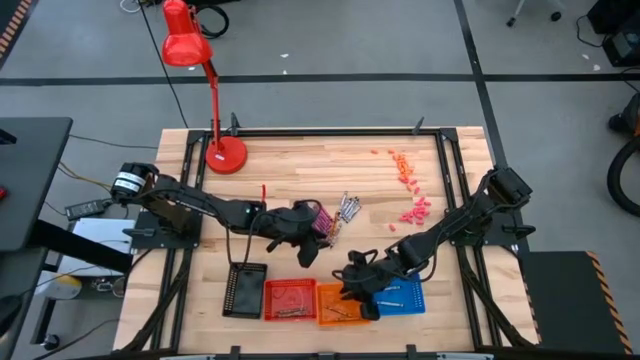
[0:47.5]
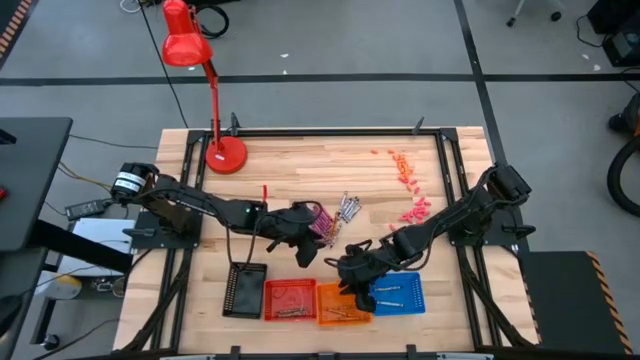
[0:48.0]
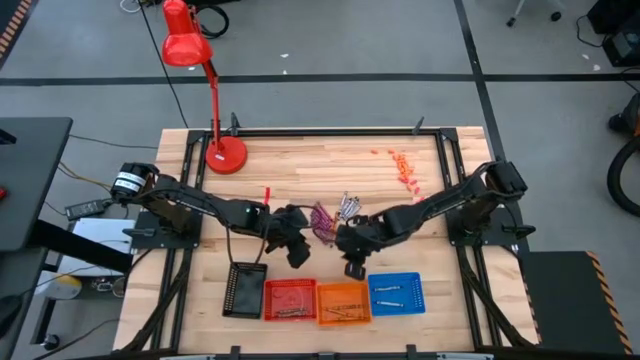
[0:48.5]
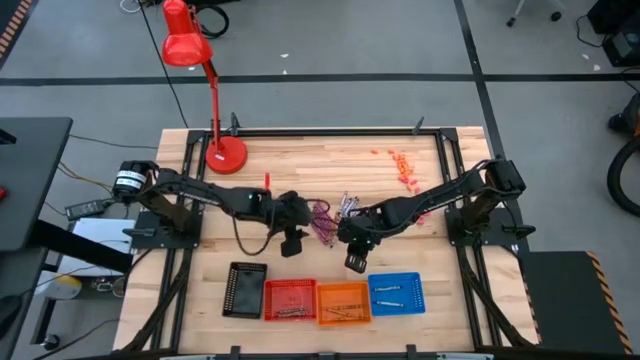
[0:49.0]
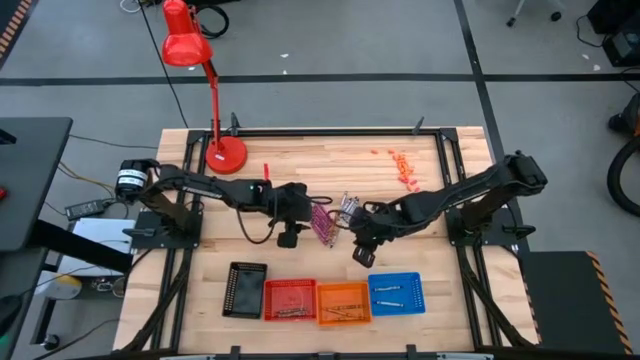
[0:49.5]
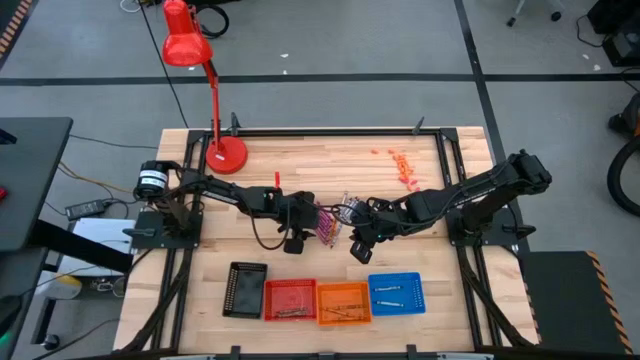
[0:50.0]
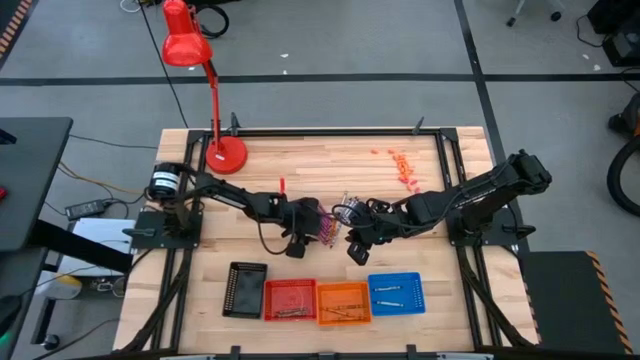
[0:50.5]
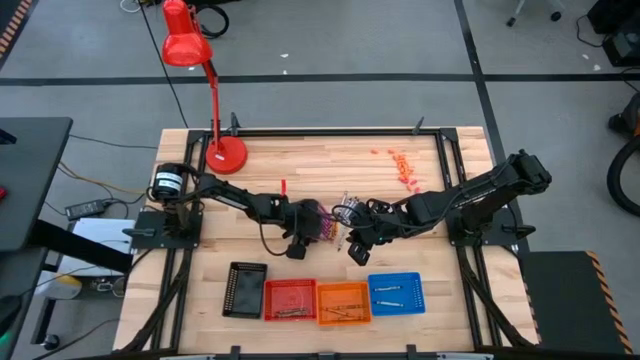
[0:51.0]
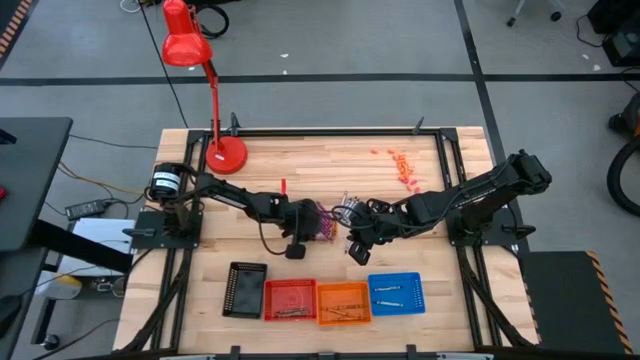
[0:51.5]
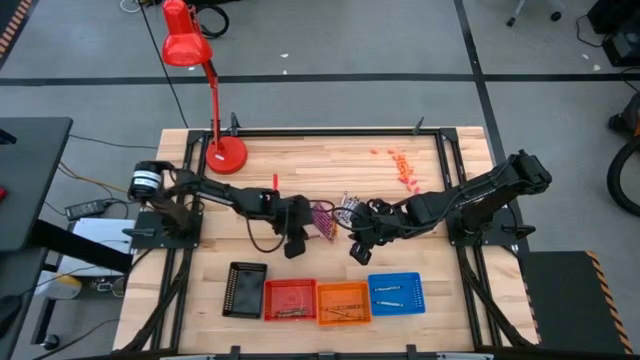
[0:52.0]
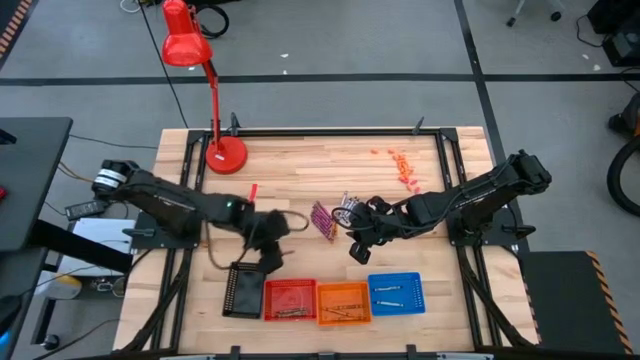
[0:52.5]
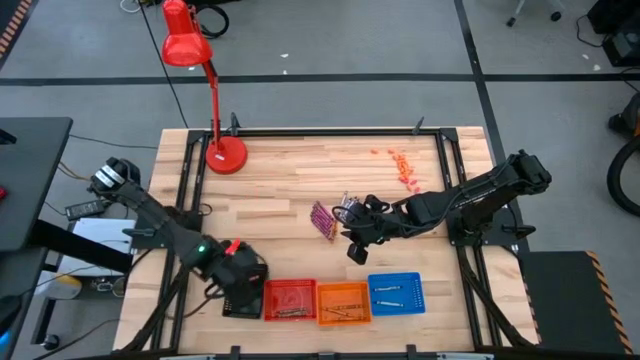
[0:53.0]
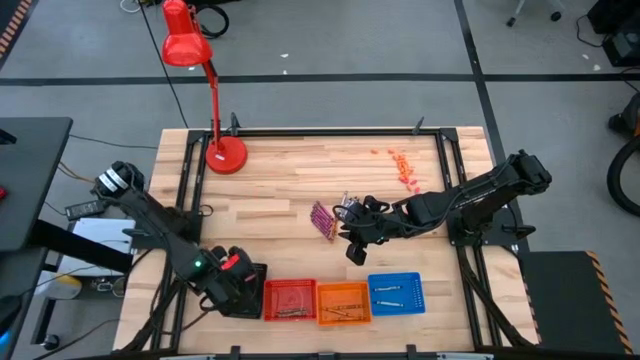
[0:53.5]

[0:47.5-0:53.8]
Task: Sort crayons
Put the violet crayon into the black bin

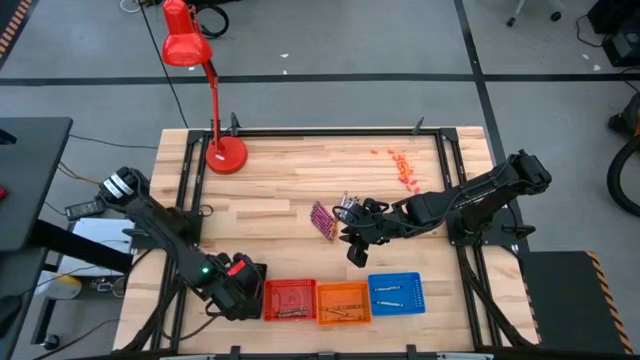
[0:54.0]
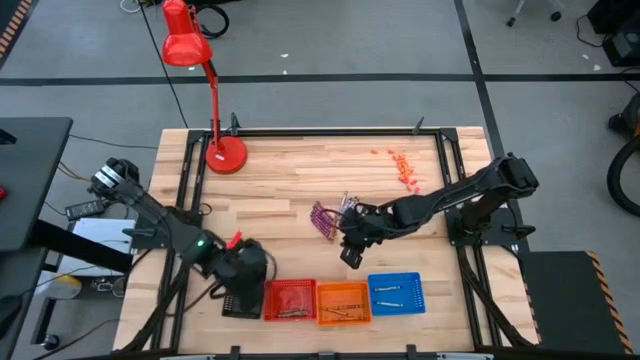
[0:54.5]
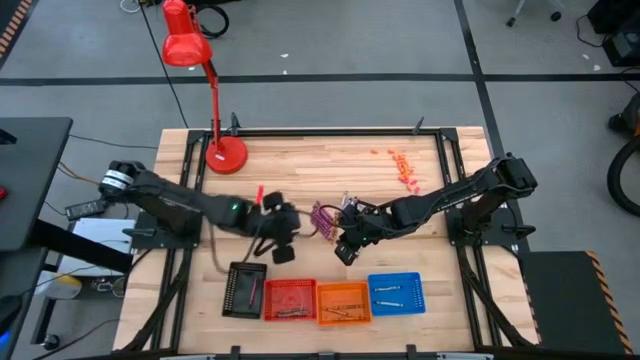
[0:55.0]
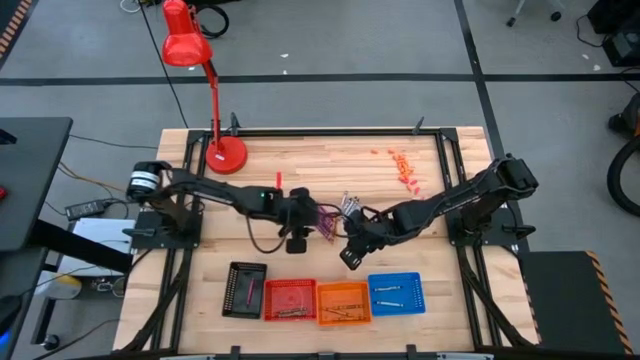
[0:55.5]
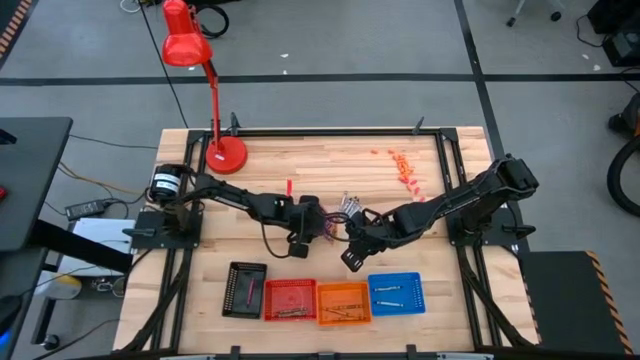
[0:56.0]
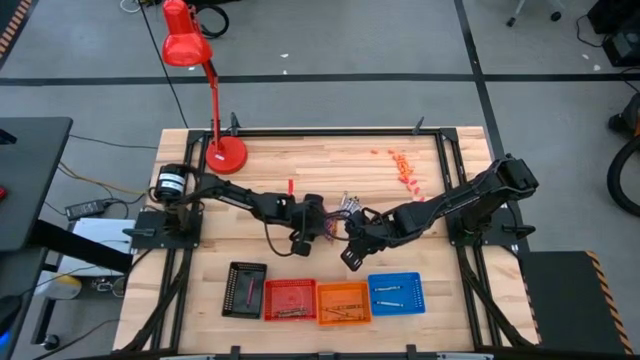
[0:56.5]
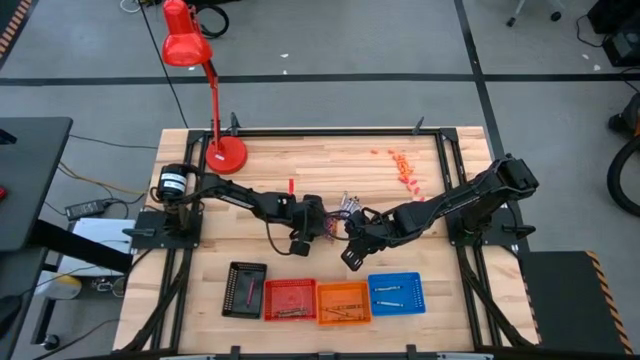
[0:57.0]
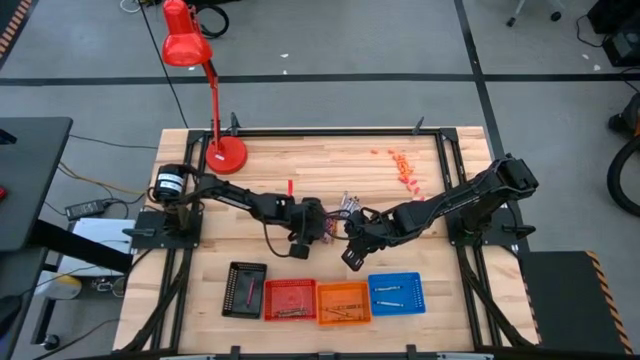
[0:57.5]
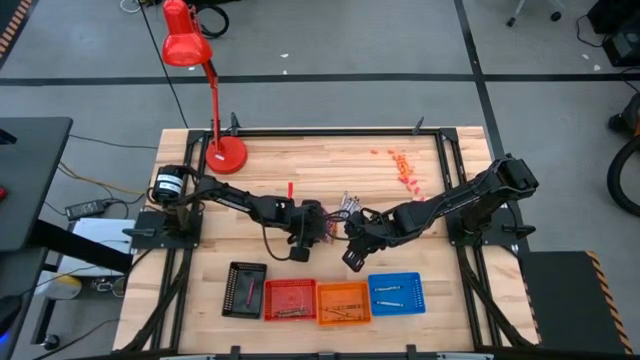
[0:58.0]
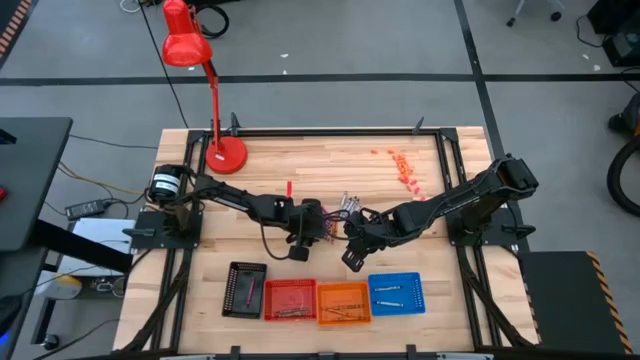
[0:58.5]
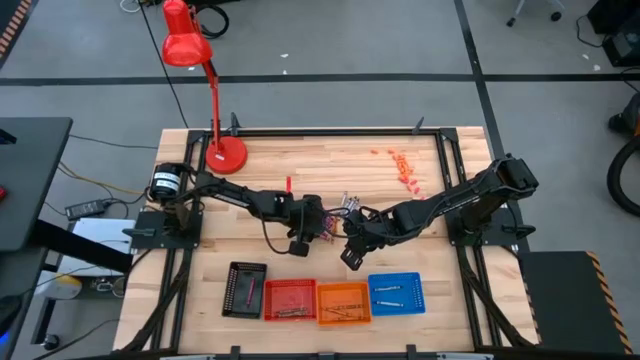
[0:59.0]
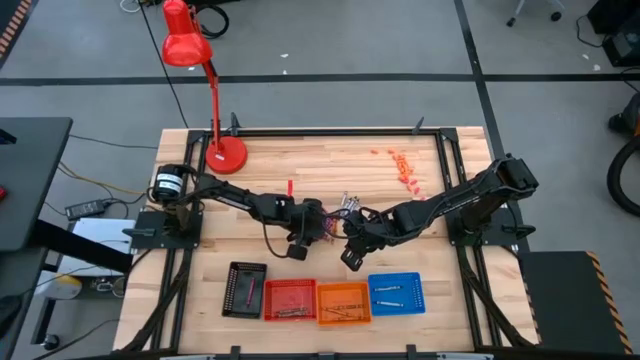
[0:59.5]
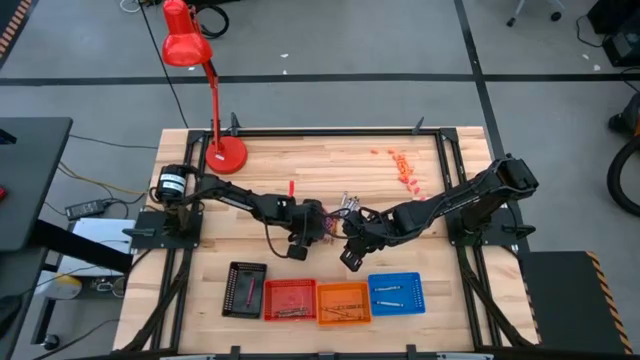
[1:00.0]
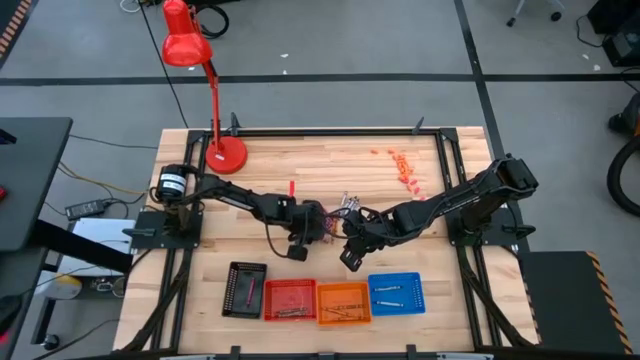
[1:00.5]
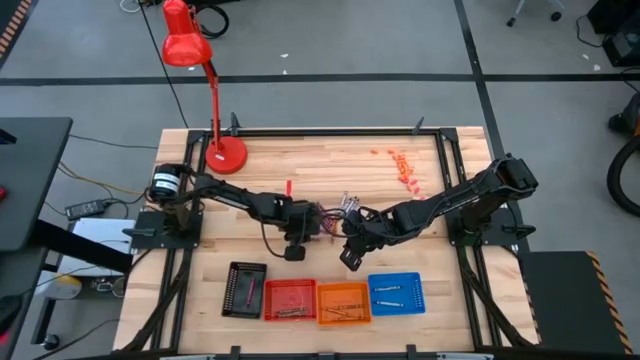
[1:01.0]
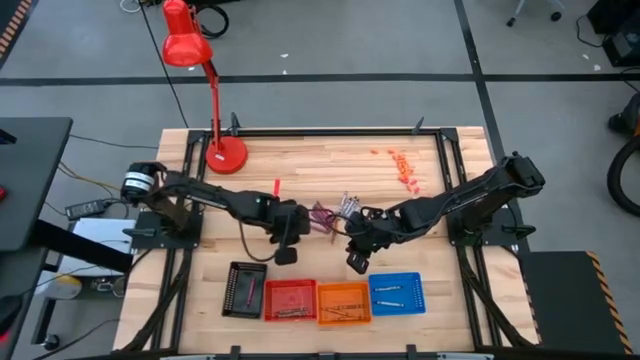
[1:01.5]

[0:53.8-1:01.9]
Put the violet crayon into the black bin

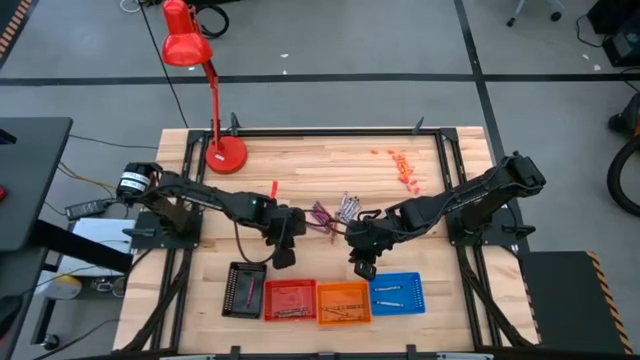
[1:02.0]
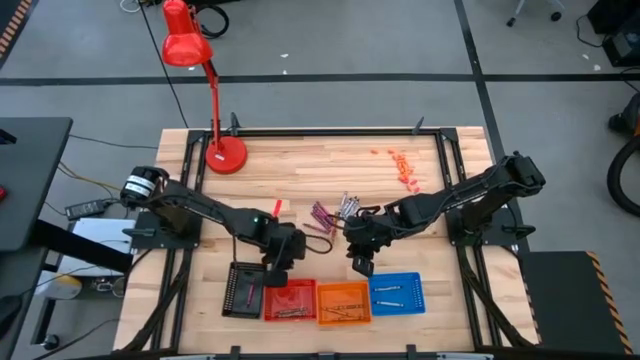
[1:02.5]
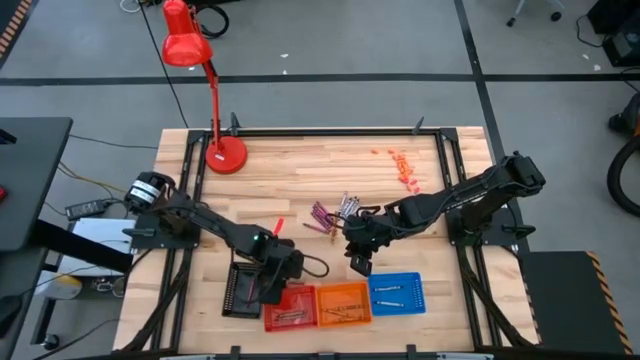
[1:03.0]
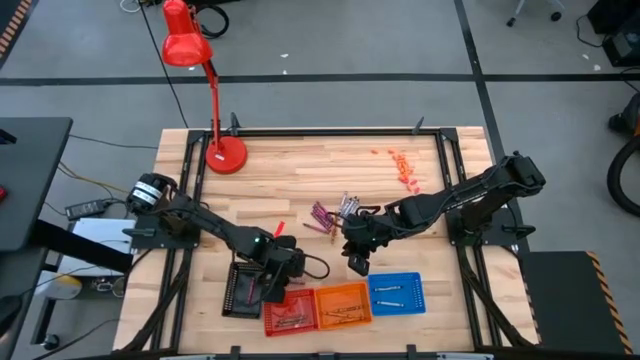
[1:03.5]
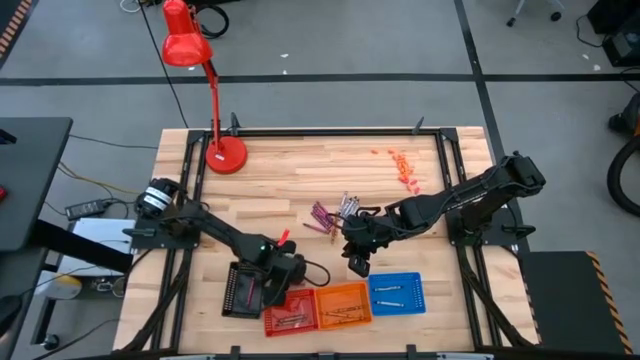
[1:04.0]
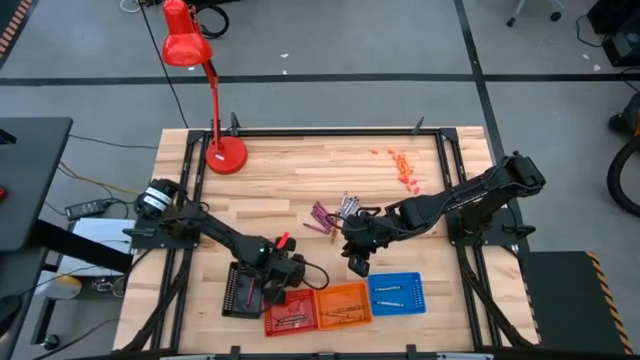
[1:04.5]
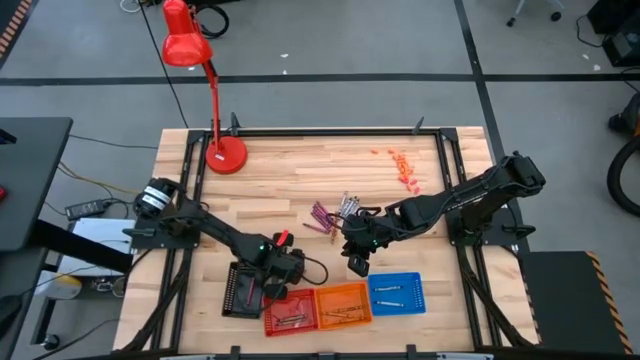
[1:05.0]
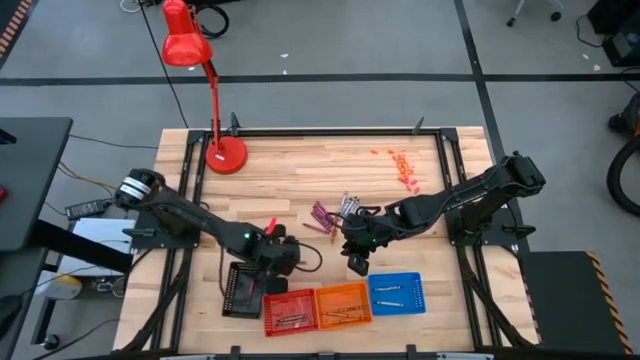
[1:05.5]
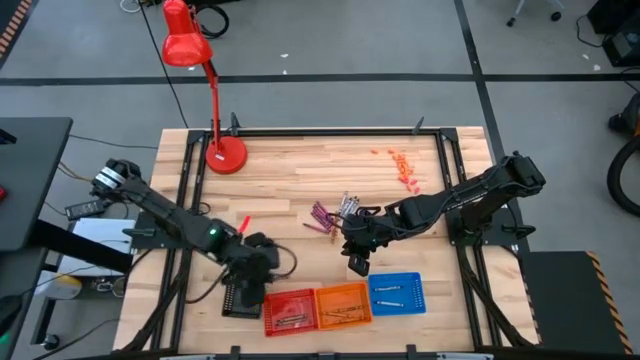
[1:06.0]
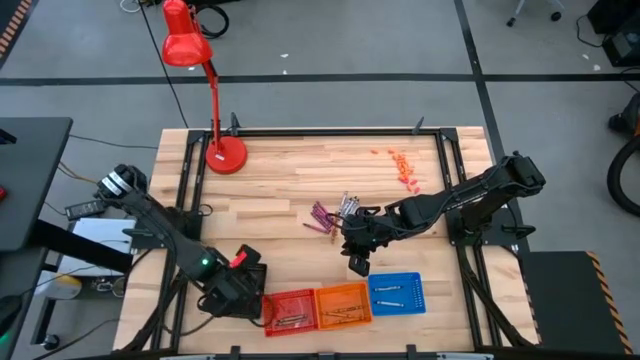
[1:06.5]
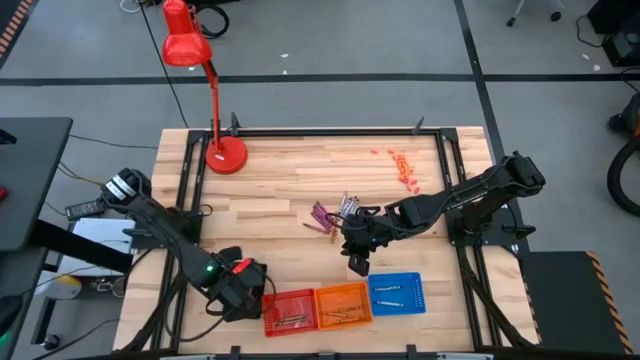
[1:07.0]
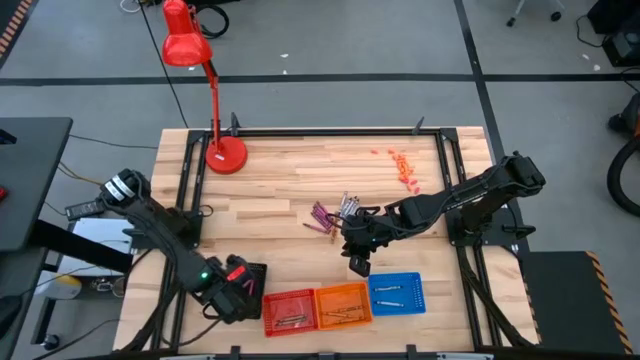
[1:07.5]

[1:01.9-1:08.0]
Put the violet crayon into the black bin
